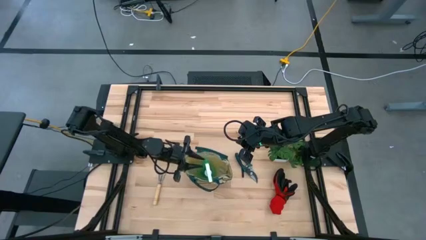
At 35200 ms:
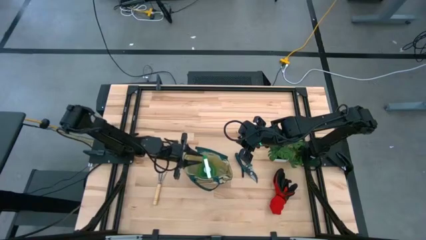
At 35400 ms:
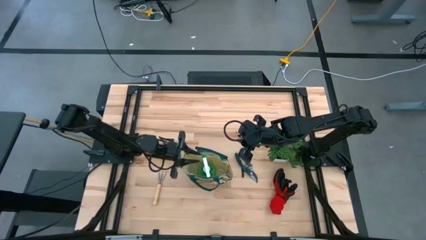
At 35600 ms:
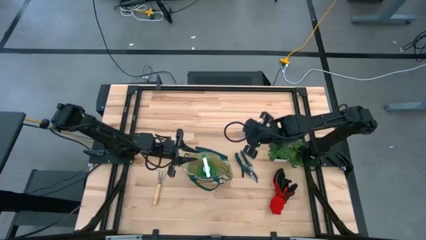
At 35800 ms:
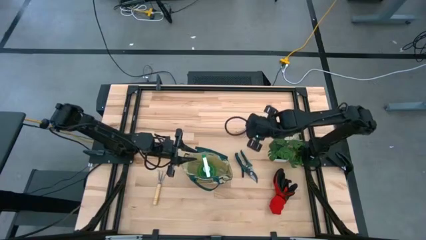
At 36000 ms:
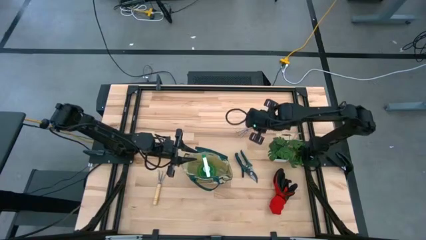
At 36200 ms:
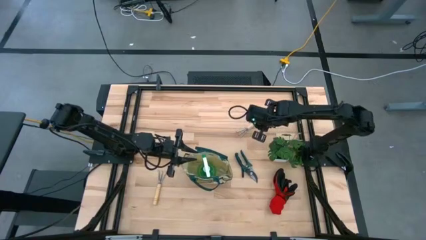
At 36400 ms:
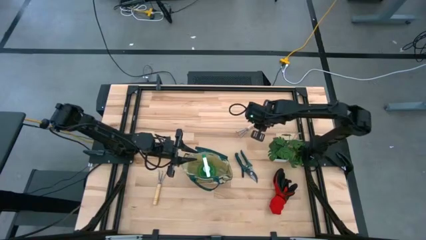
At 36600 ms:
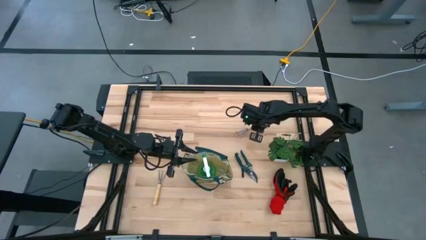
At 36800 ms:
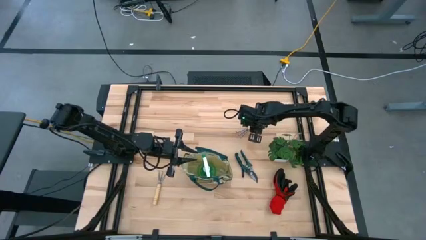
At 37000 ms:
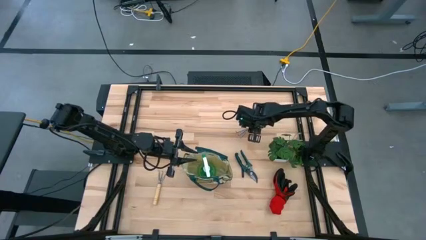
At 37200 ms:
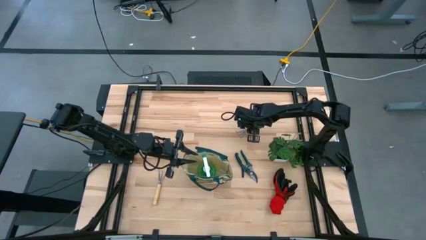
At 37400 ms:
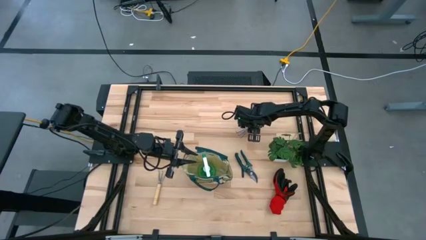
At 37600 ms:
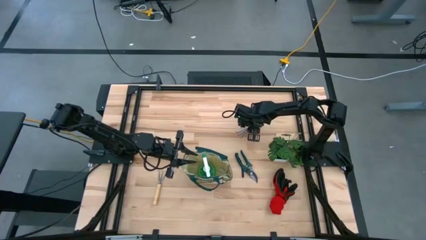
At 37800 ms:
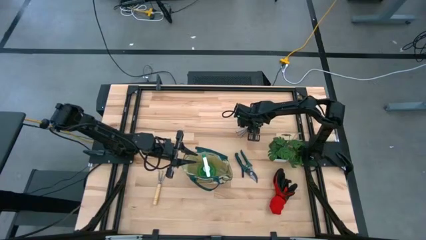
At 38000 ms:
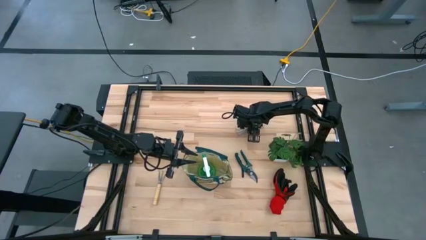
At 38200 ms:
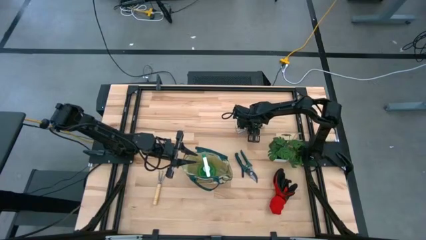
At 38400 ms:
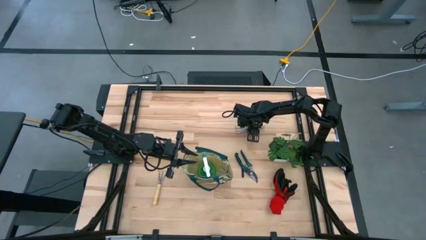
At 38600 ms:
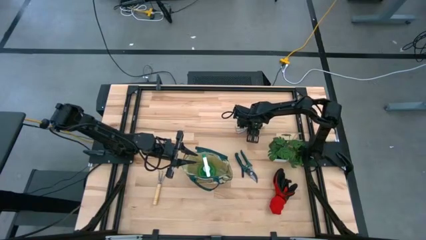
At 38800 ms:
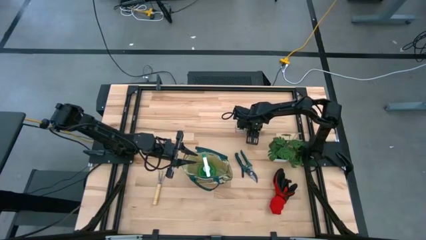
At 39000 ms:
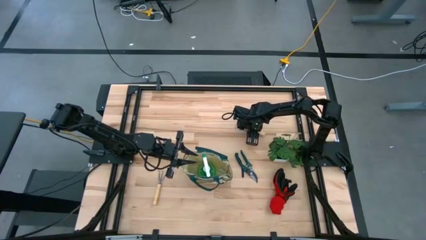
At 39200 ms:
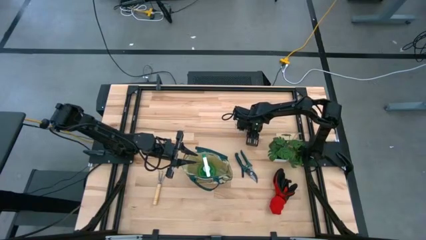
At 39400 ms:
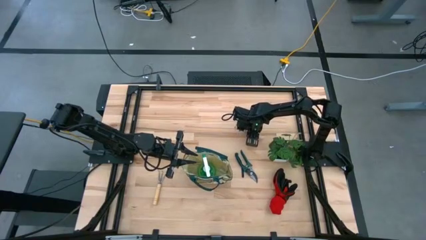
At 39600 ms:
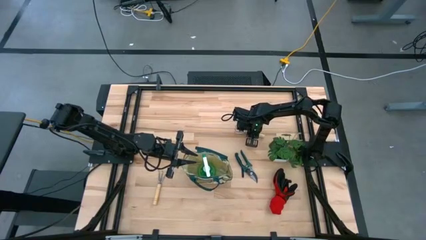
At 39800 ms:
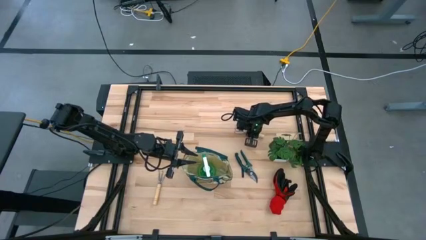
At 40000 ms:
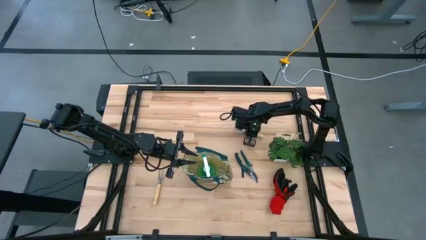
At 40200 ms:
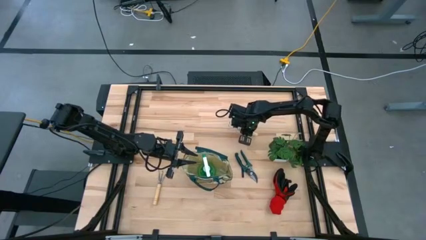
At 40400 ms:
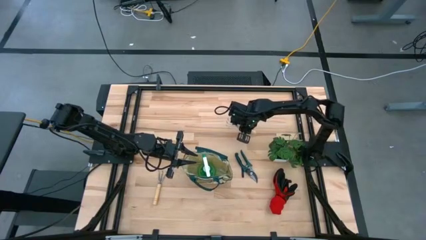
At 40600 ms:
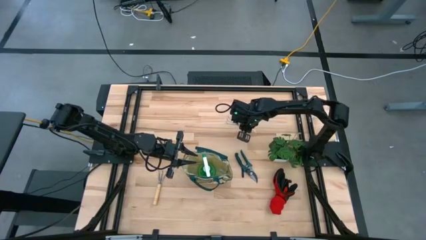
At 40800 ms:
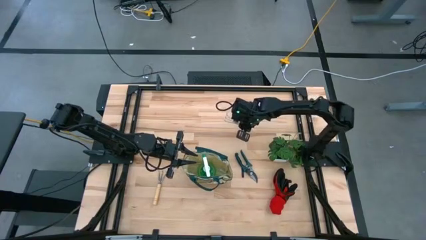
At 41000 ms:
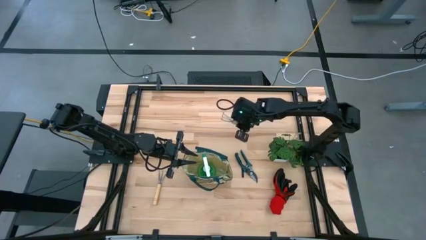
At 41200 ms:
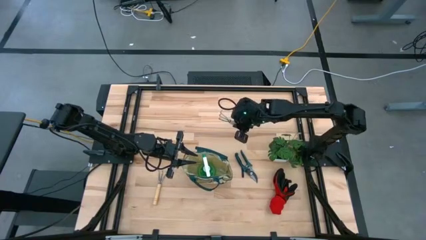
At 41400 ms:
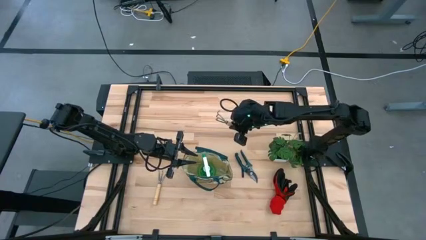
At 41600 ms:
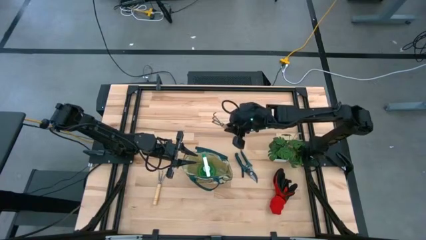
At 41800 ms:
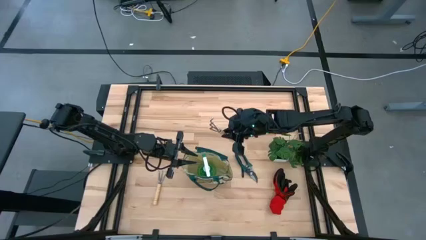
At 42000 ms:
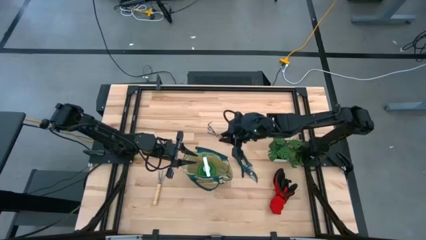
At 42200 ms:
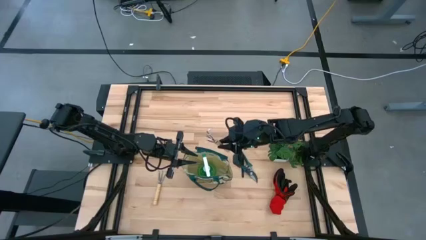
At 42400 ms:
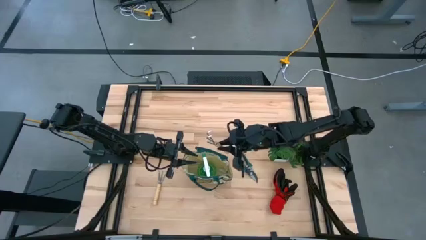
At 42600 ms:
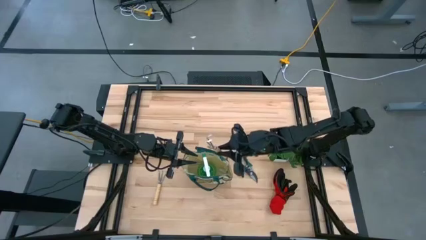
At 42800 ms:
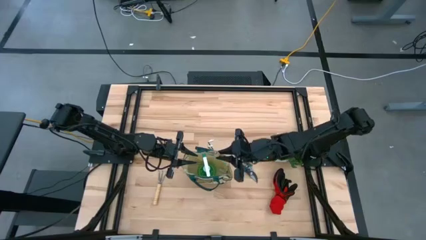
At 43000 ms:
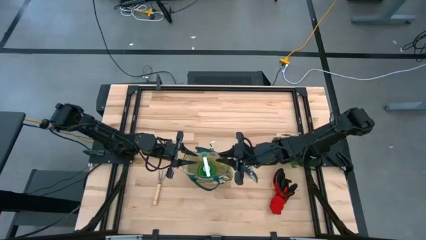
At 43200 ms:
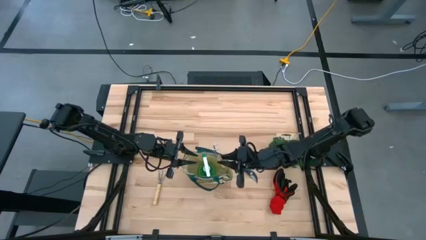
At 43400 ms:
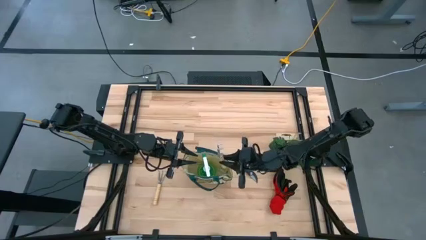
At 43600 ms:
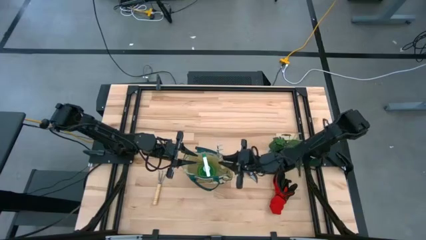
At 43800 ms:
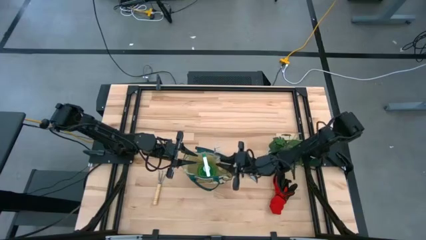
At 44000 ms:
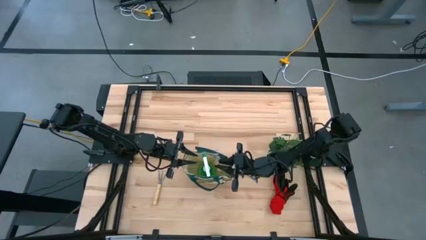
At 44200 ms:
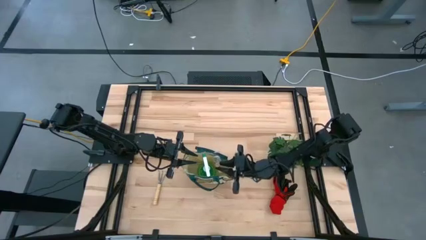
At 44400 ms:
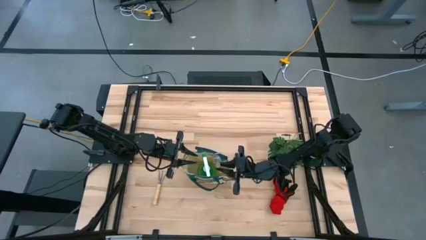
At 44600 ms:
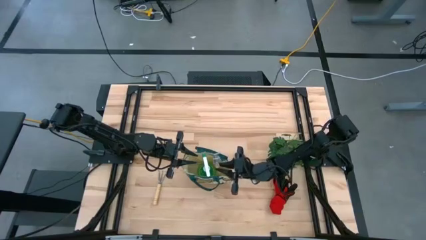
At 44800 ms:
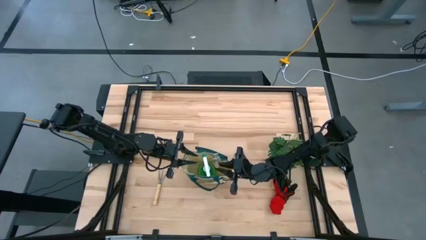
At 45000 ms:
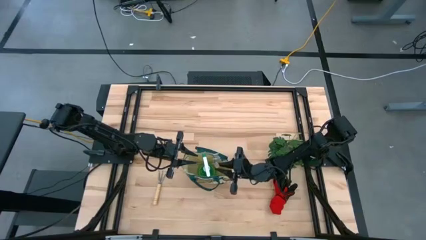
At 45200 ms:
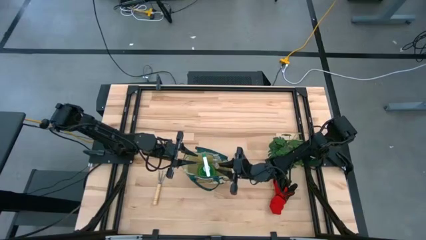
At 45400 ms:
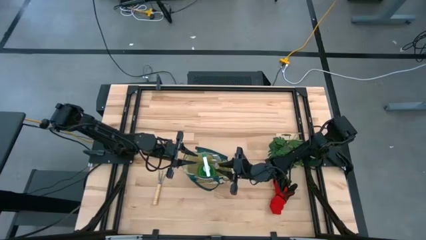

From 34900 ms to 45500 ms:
Task: Pick & Place Garden tools in Gardening bag
Put the top brown hand rake into the gardening bag

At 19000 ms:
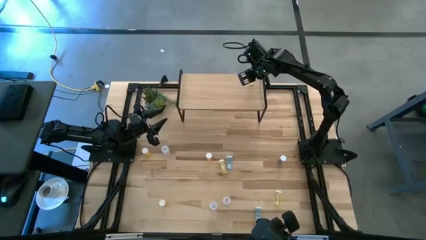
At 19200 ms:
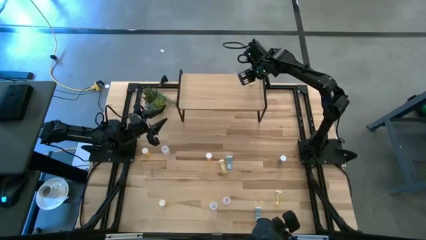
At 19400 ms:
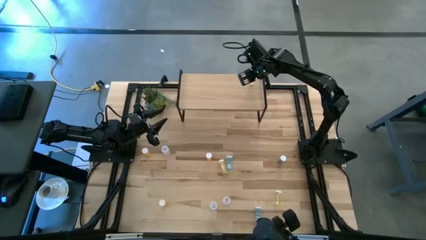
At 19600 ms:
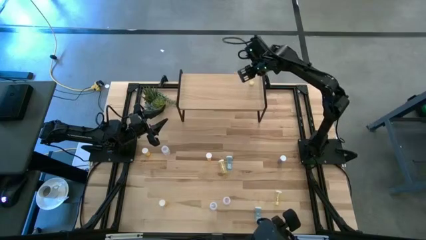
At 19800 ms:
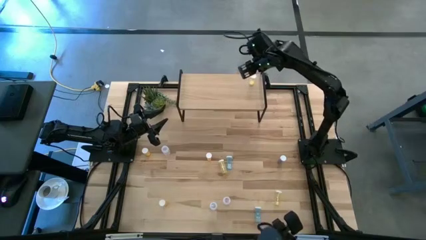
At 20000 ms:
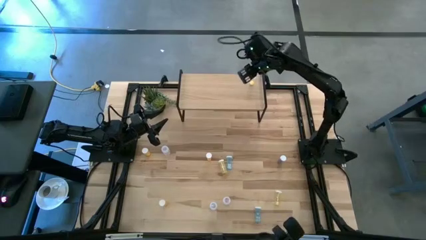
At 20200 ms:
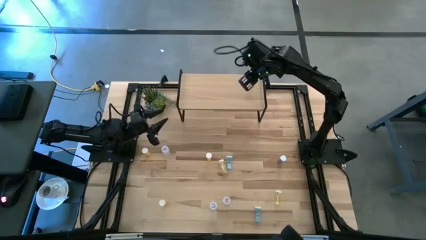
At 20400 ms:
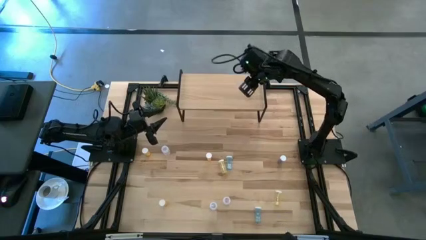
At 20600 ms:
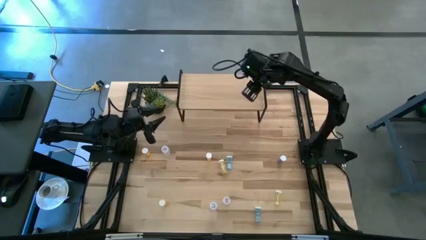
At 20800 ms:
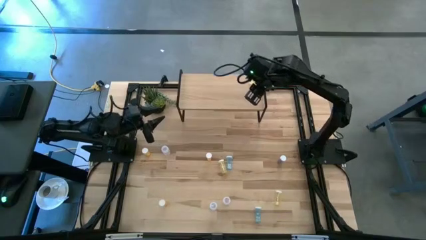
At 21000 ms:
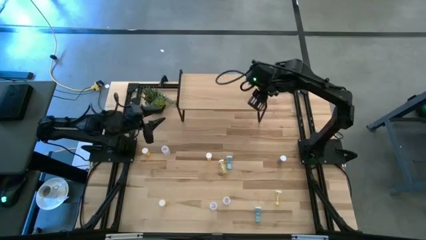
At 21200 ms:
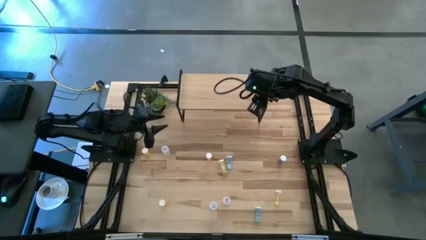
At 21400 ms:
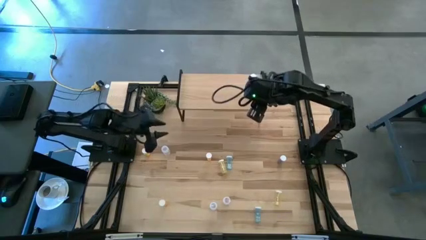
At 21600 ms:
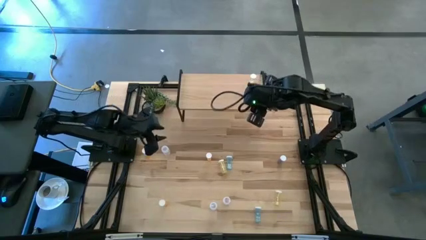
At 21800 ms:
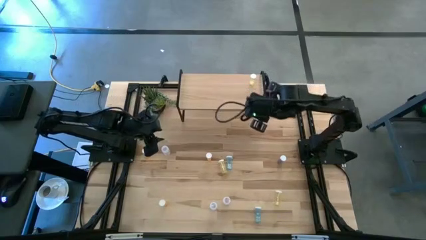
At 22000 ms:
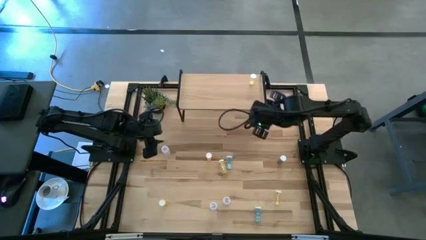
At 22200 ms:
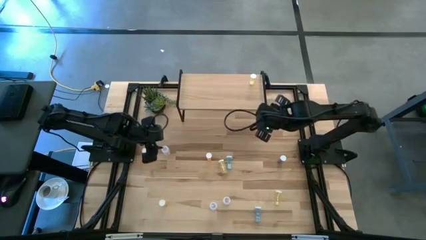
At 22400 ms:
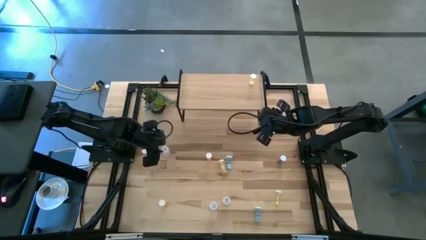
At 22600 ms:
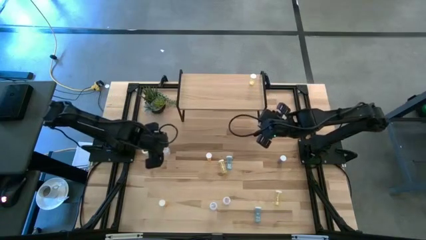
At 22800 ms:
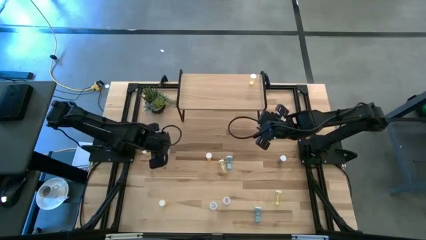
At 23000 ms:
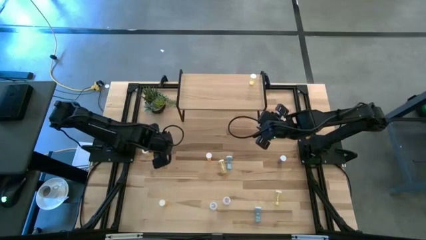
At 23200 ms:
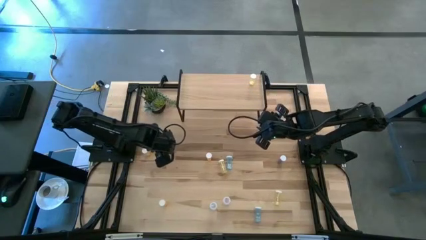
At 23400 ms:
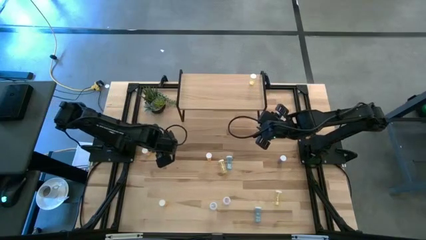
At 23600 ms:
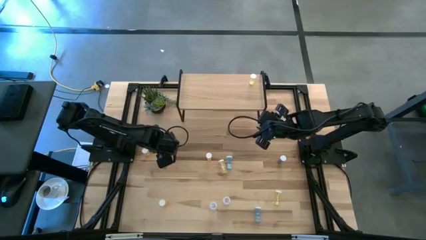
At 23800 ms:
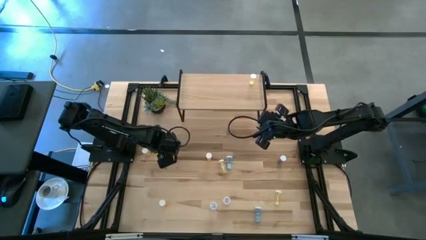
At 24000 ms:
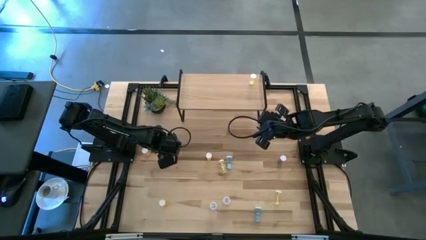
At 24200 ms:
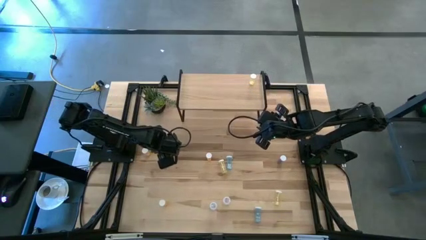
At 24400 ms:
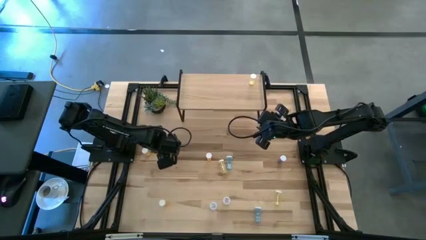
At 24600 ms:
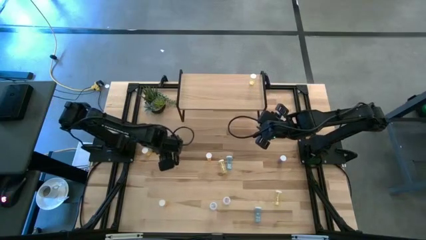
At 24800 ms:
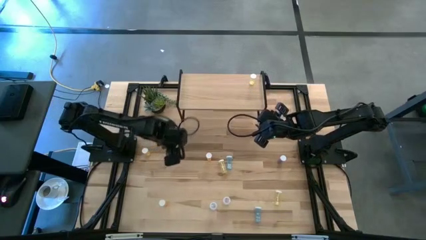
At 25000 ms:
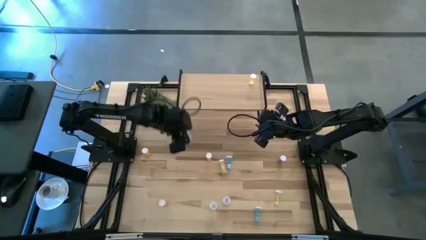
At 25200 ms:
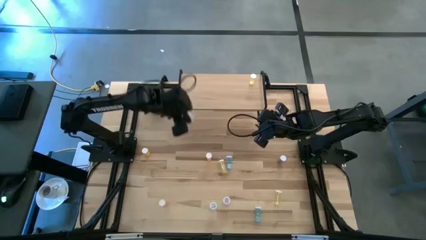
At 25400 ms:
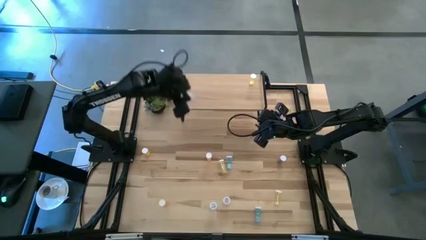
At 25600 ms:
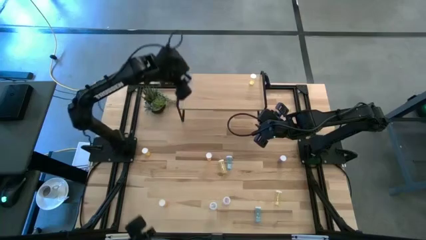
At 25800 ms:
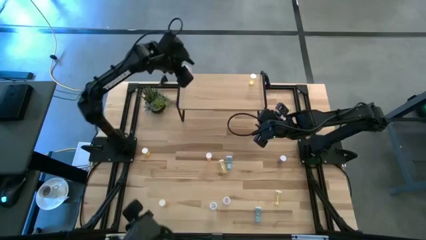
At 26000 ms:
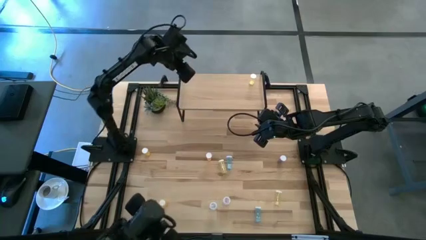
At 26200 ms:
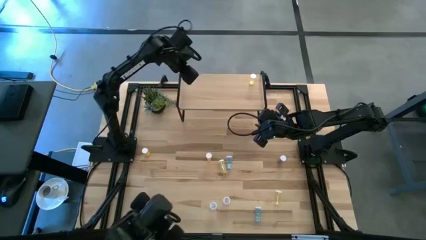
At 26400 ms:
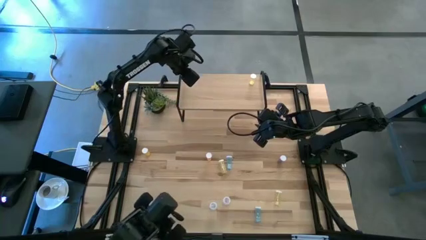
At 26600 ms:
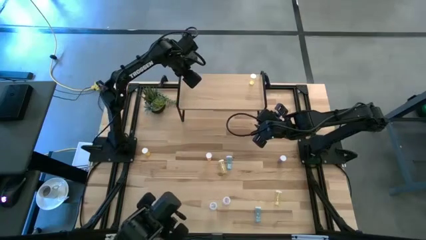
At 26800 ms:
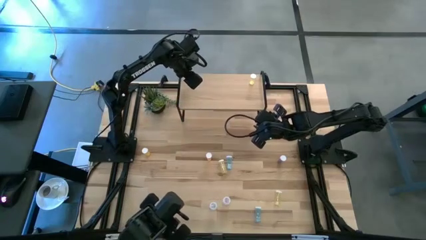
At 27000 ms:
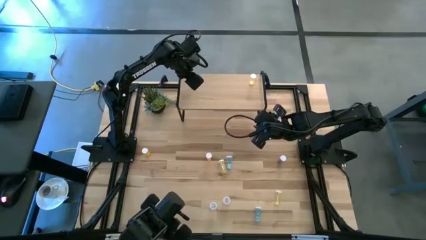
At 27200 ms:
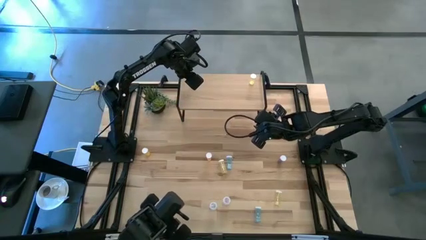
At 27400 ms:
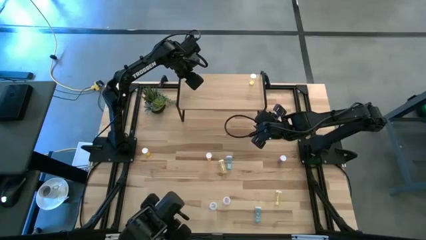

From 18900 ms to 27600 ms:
Task: Pick and place medicine bottles onto shelf by color
Put the top transparent pill bottle on the shelf
